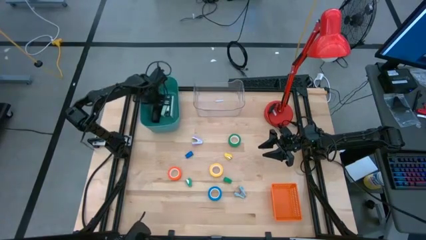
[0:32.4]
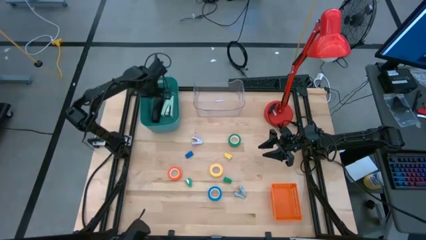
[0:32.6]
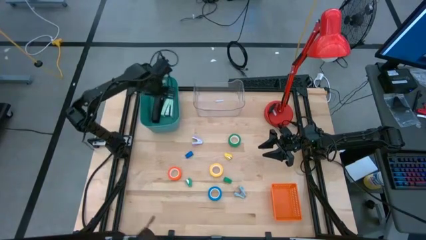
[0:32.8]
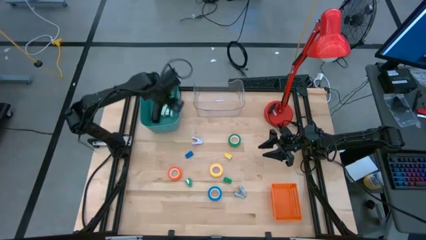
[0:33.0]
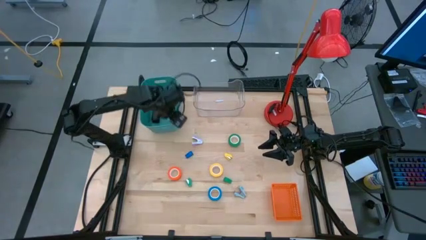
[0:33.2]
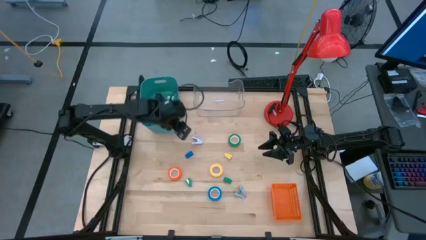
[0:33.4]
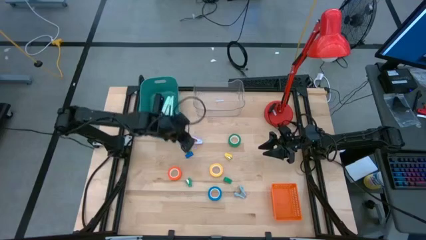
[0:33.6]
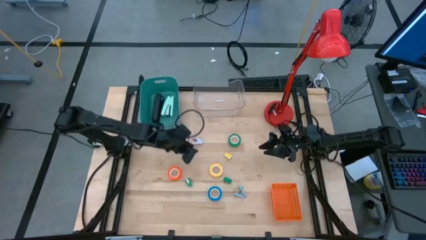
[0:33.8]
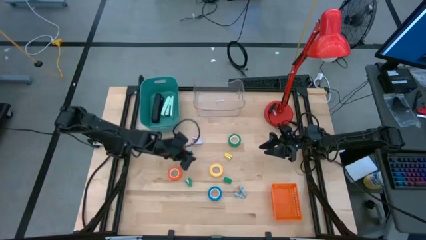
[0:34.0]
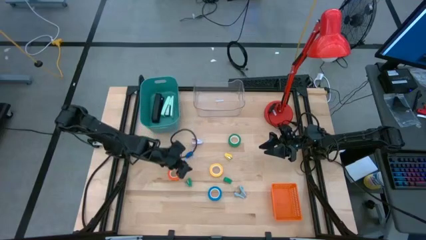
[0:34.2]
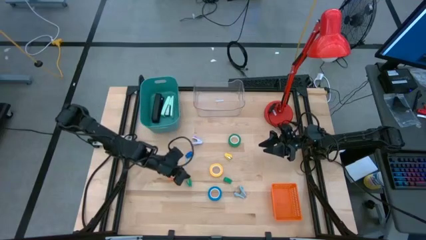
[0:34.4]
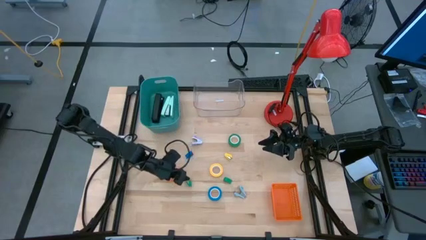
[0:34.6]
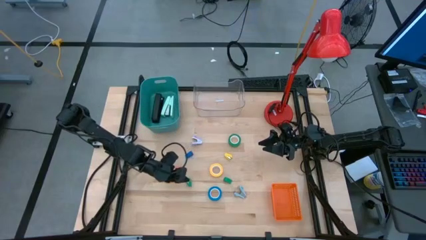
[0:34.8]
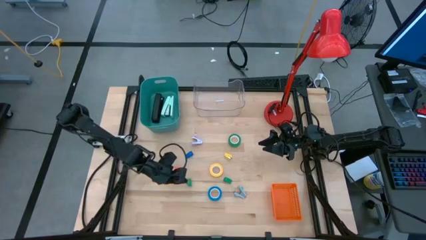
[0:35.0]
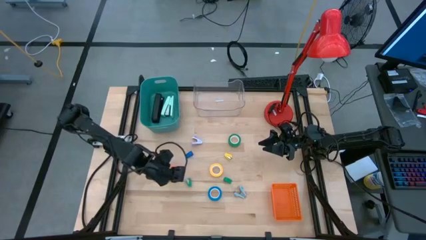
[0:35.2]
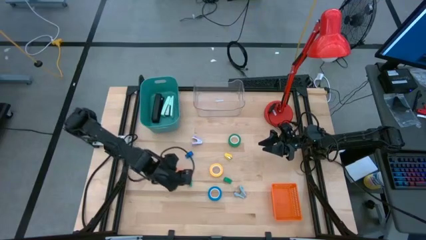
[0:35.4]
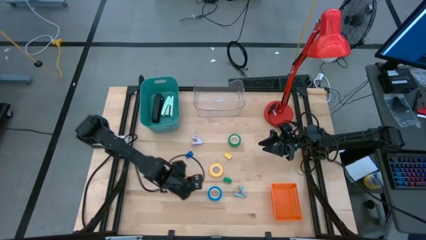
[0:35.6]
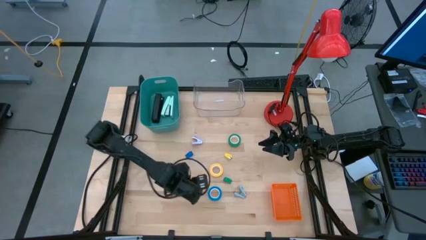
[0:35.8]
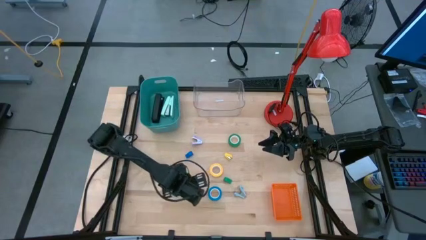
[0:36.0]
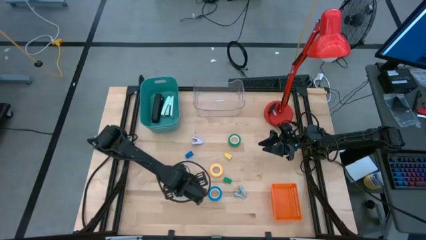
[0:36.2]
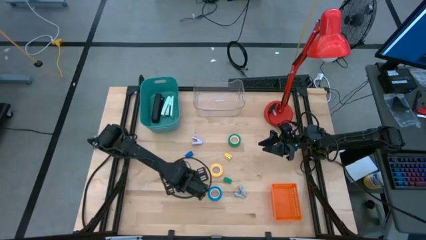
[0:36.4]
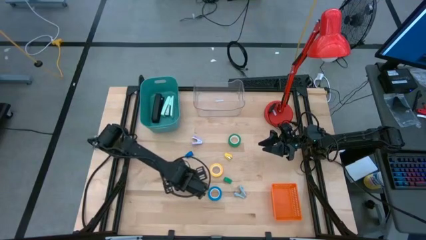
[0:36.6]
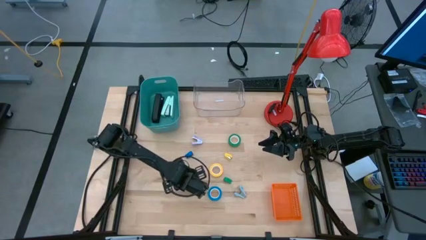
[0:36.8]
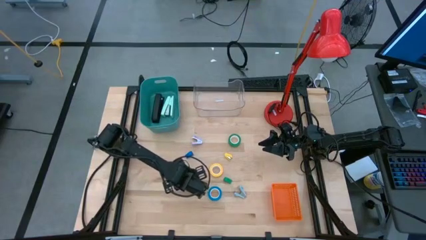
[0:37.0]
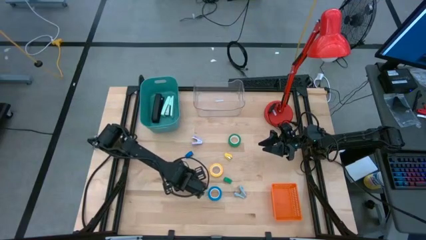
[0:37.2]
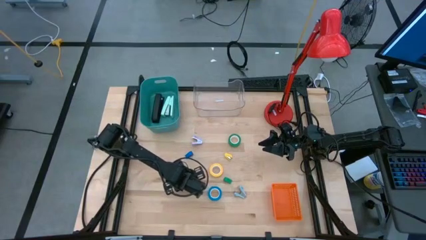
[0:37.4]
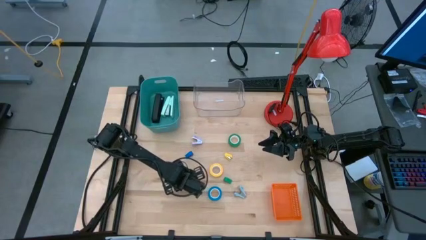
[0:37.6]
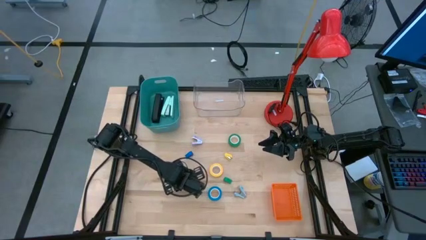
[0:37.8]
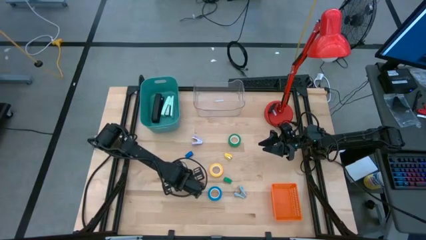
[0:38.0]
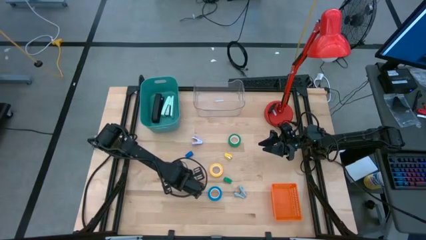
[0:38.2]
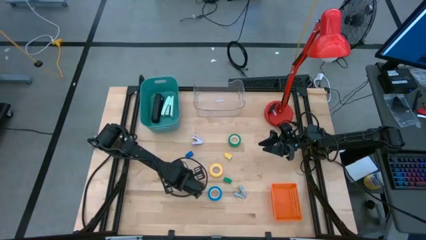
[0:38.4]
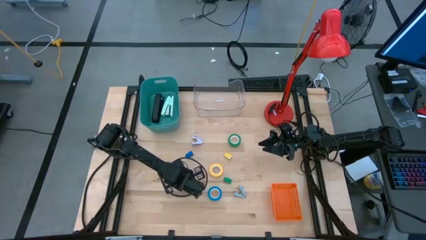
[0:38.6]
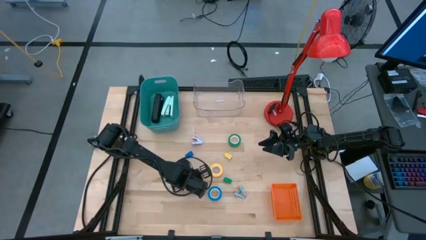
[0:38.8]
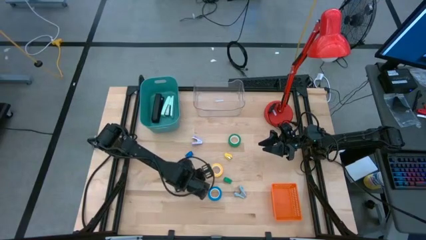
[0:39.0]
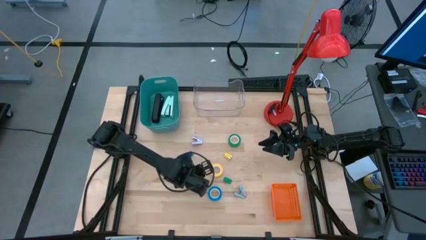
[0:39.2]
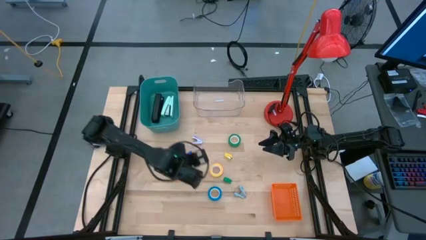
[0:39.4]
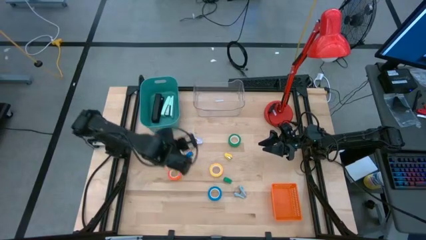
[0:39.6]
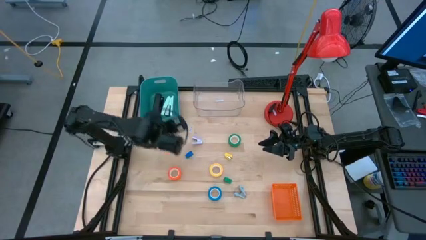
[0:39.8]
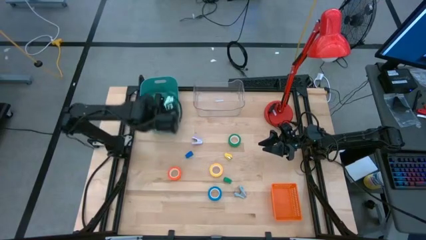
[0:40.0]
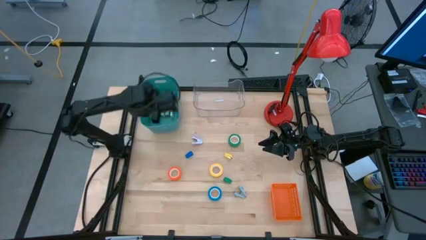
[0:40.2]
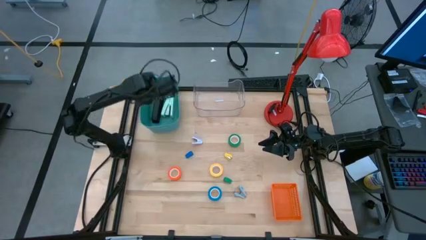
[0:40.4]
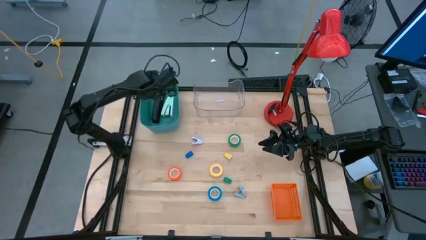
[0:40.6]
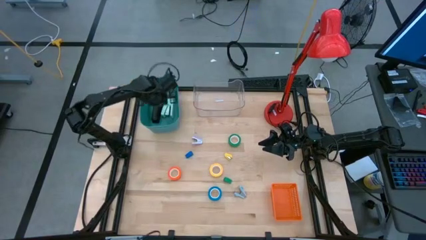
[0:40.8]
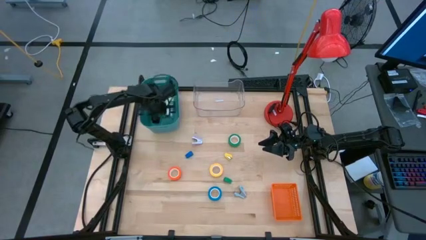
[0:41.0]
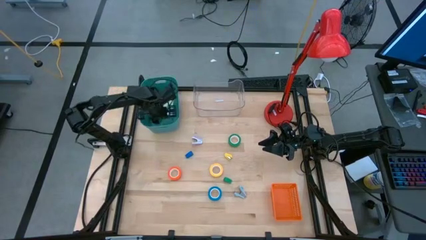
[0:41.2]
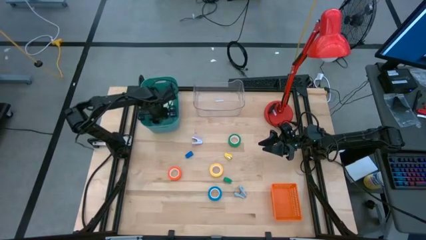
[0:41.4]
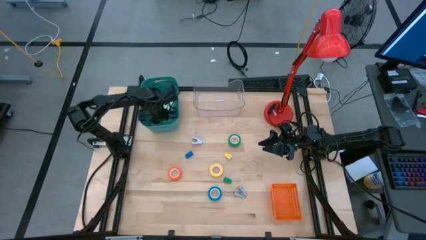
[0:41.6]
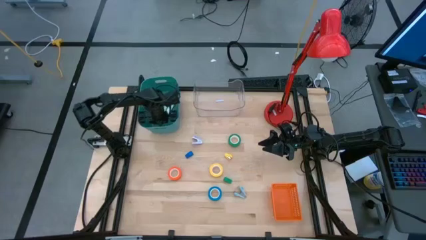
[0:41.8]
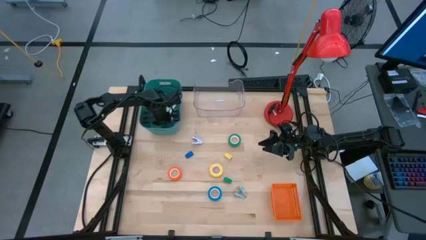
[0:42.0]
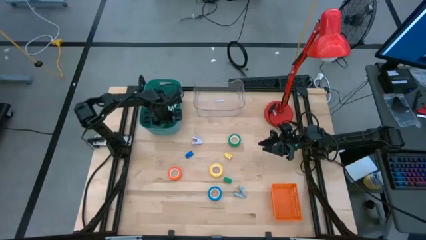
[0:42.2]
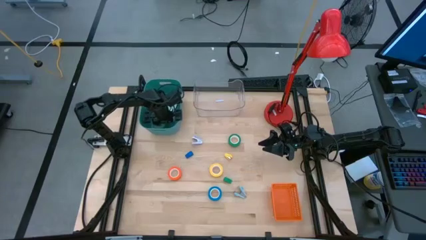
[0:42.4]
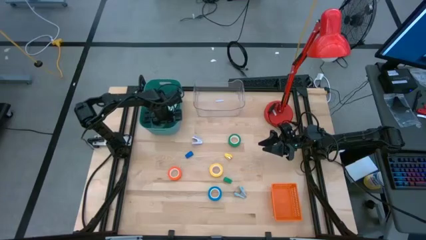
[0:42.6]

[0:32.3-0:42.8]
Task: Pick and place Stapler, Stapler remover, tape
Put the left small green stapler into the green bin

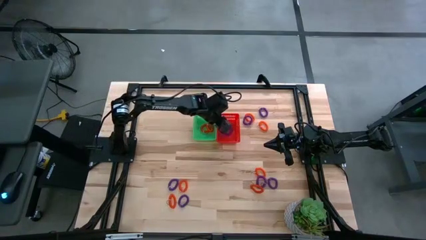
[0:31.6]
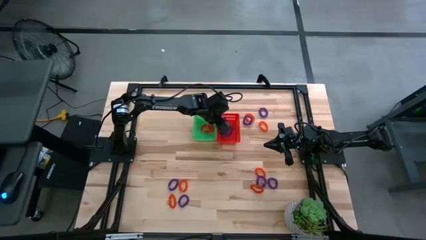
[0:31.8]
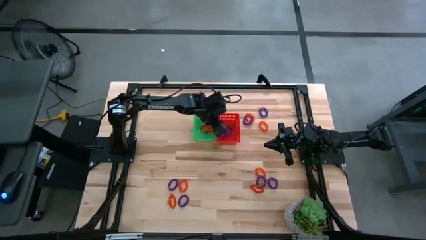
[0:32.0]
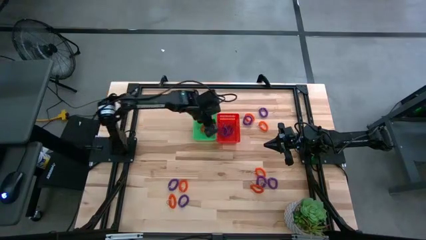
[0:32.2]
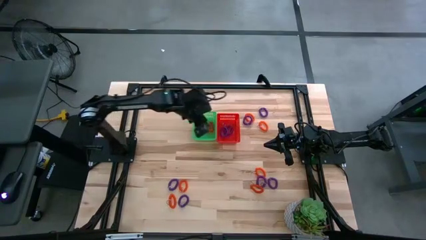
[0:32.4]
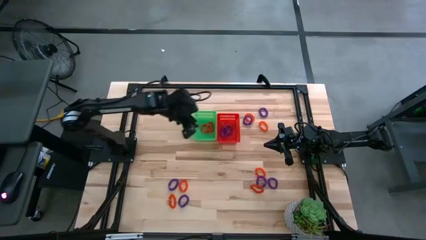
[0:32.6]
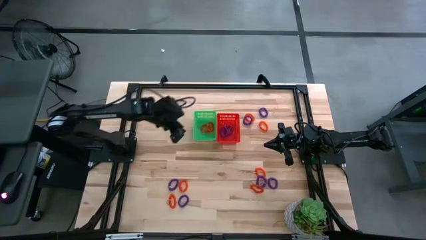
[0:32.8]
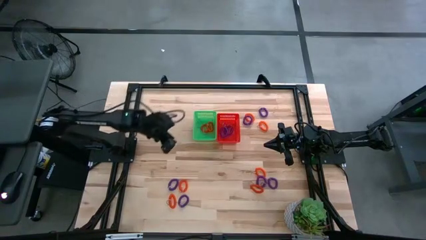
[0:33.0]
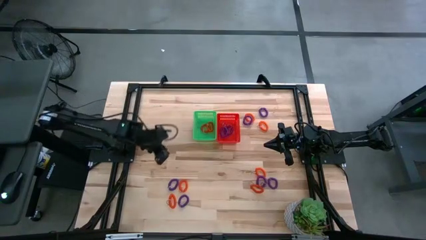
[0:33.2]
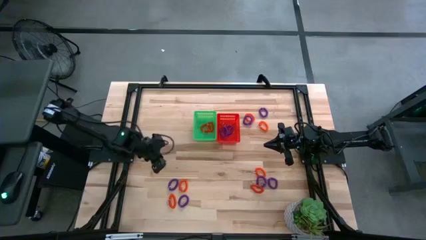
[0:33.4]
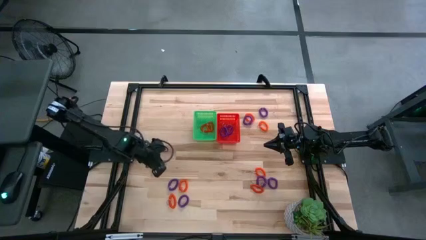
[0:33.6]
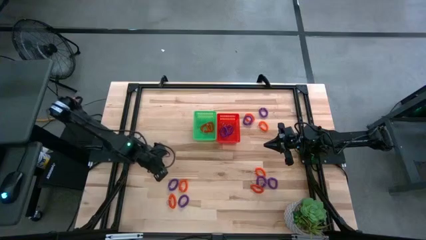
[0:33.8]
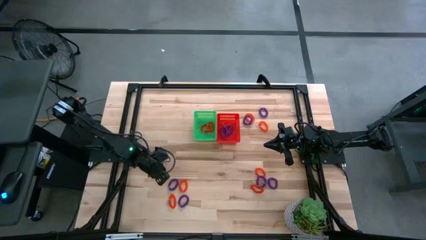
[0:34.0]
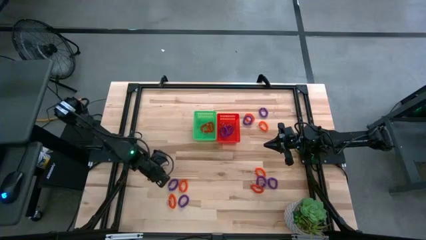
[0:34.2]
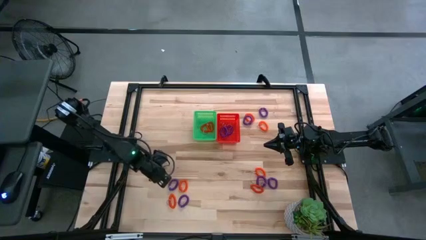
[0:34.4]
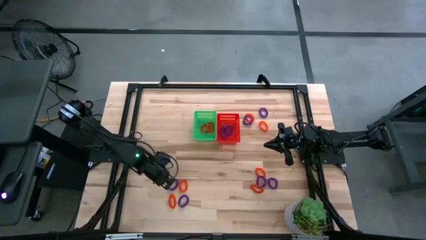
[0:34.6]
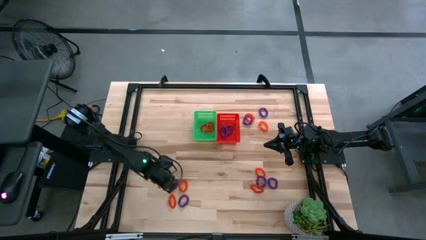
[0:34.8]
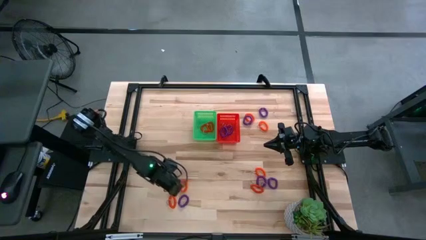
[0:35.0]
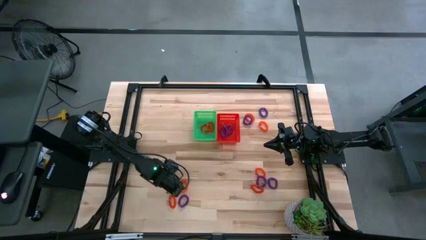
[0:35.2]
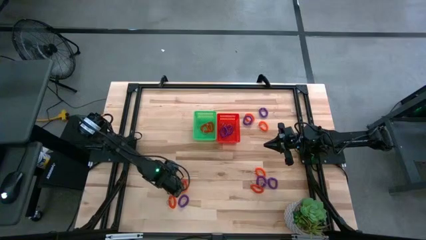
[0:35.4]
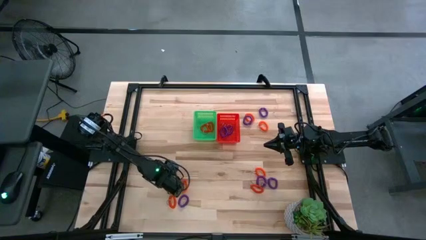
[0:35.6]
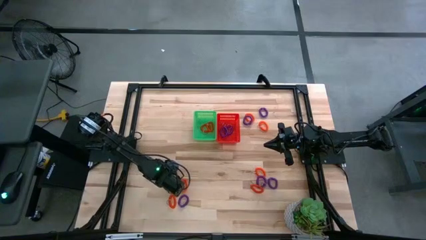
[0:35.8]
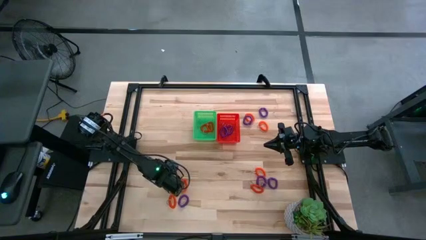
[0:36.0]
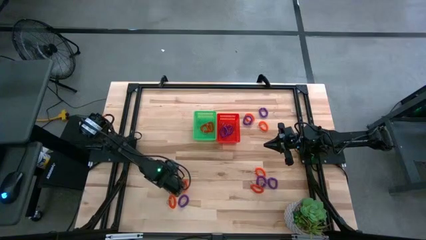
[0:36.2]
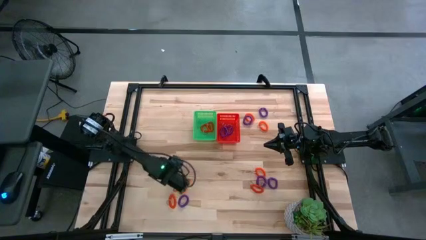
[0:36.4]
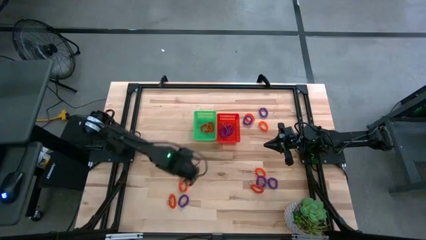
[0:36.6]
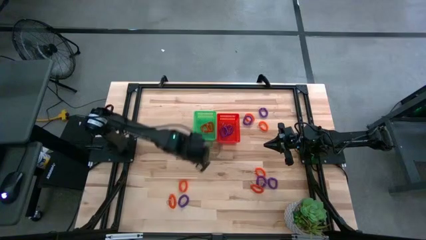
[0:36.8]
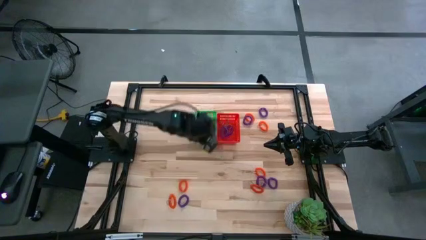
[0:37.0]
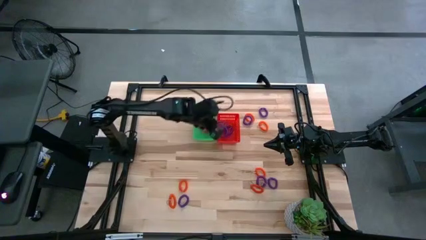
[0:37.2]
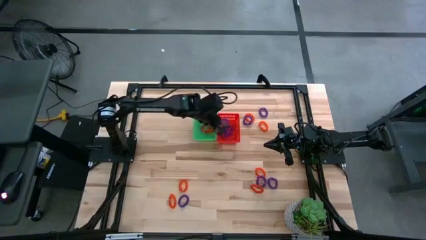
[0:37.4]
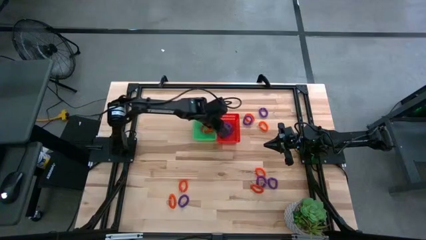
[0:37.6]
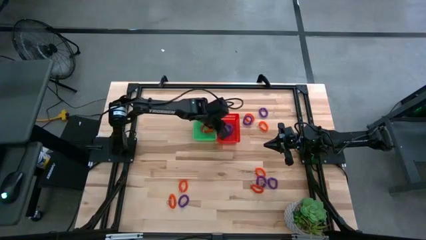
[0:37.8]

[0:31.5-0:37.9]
Task: Sort spring keychains
Put the purple spring keychain into the orange bin
